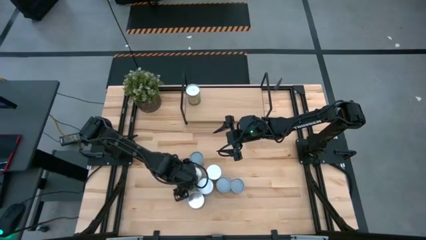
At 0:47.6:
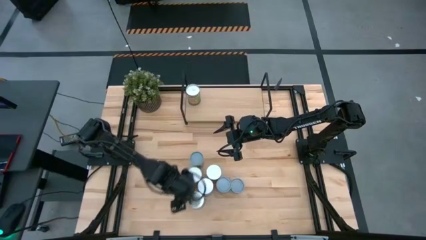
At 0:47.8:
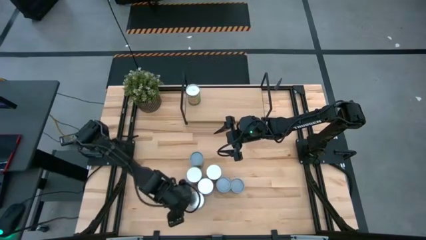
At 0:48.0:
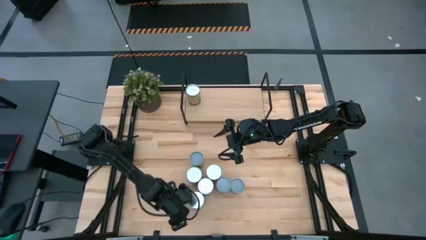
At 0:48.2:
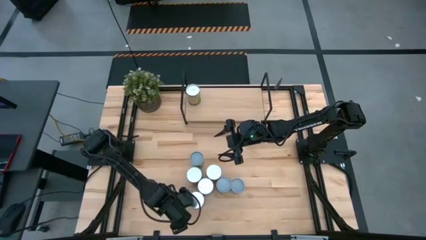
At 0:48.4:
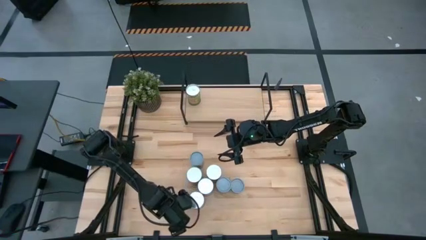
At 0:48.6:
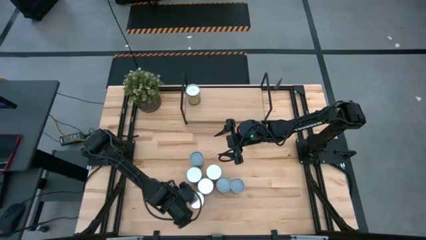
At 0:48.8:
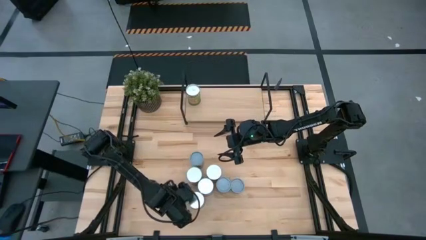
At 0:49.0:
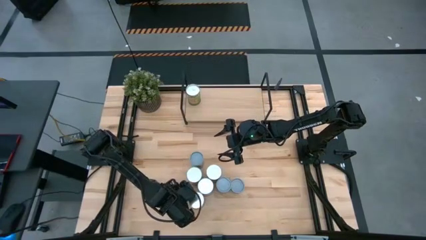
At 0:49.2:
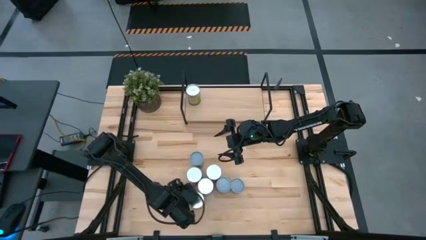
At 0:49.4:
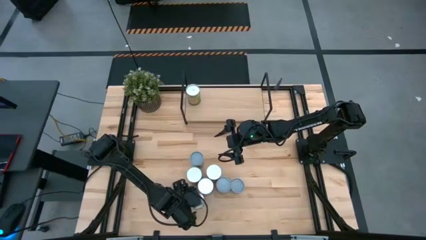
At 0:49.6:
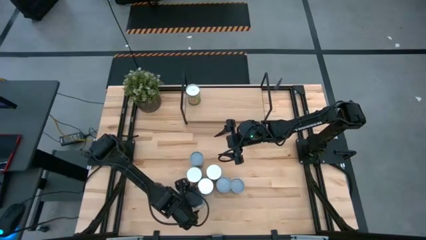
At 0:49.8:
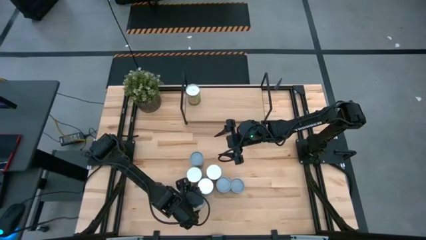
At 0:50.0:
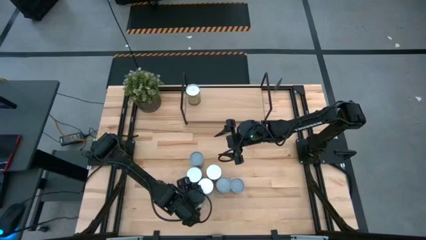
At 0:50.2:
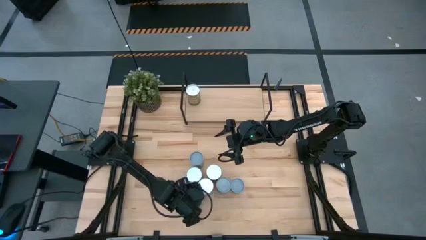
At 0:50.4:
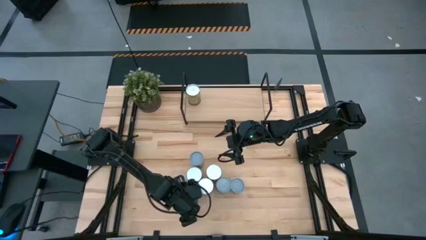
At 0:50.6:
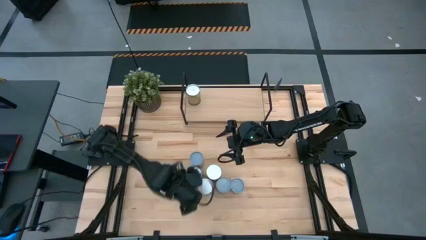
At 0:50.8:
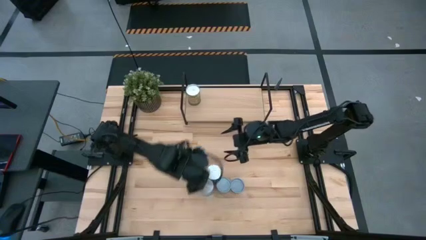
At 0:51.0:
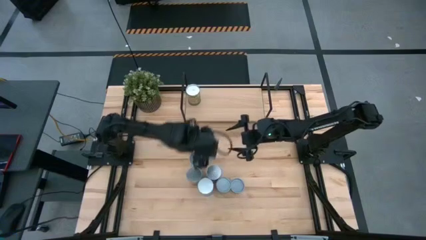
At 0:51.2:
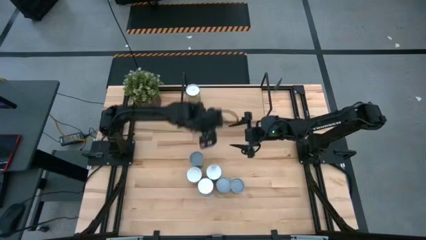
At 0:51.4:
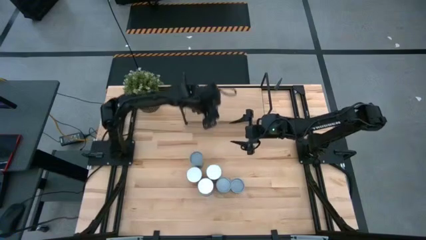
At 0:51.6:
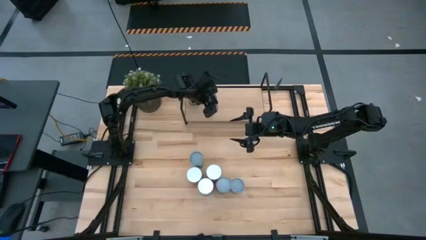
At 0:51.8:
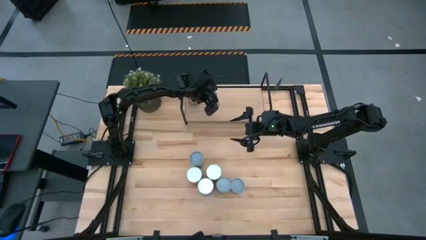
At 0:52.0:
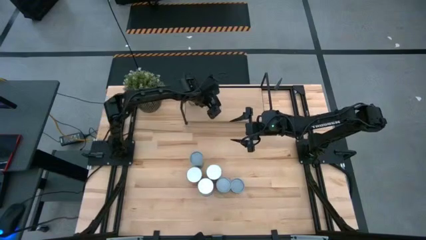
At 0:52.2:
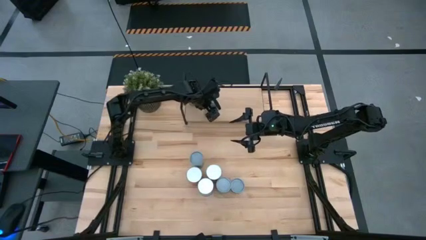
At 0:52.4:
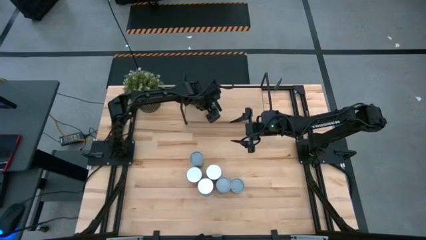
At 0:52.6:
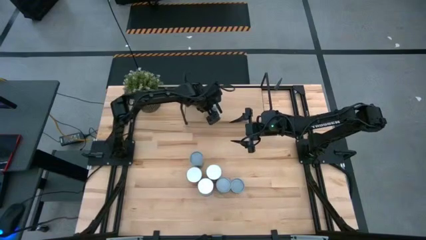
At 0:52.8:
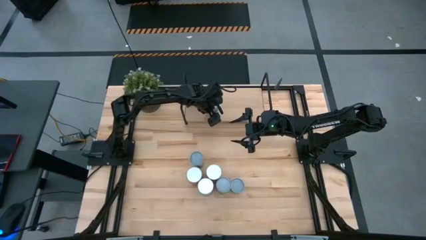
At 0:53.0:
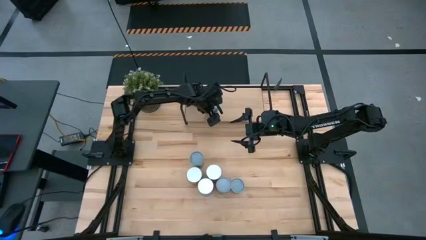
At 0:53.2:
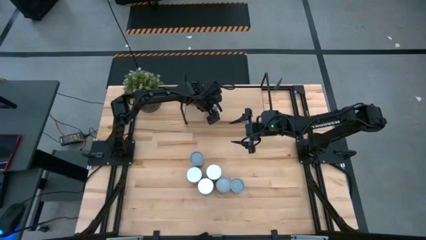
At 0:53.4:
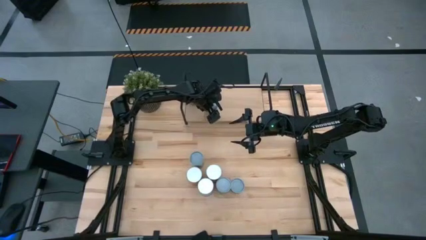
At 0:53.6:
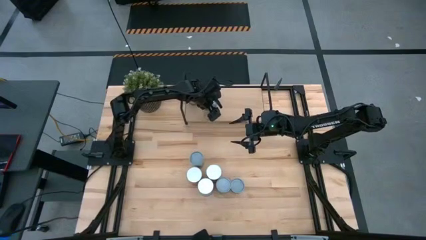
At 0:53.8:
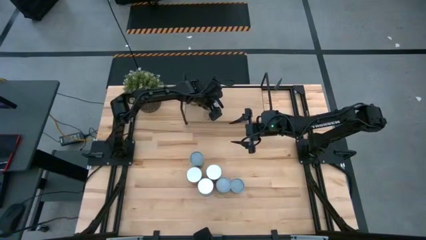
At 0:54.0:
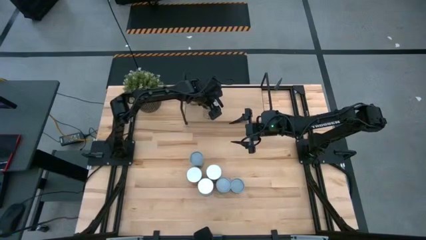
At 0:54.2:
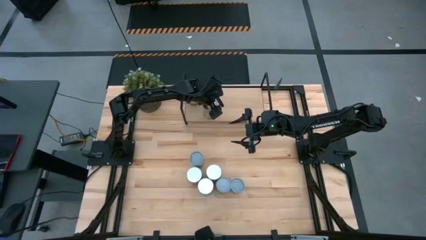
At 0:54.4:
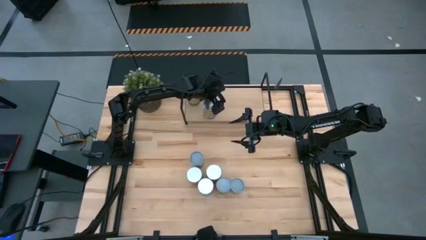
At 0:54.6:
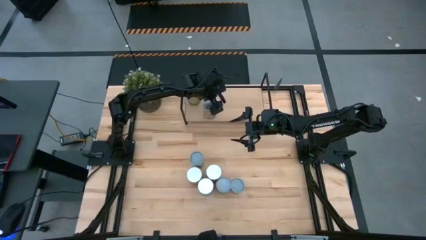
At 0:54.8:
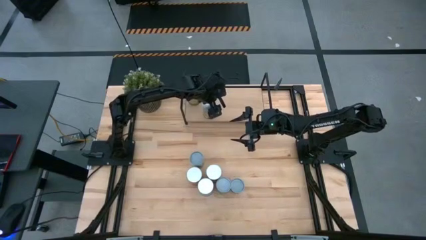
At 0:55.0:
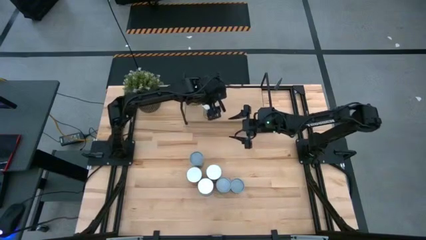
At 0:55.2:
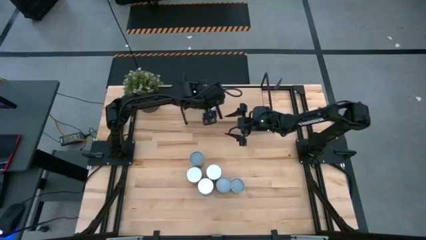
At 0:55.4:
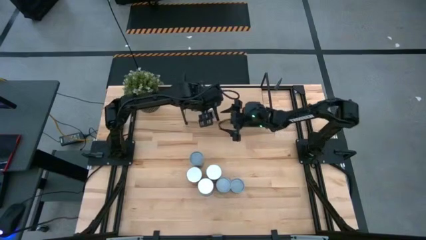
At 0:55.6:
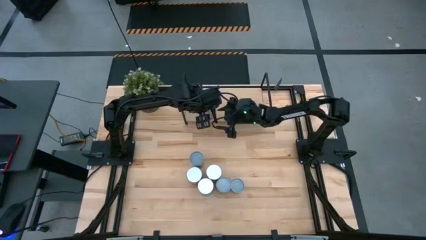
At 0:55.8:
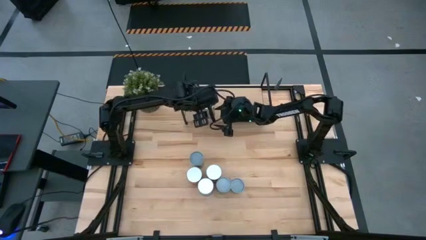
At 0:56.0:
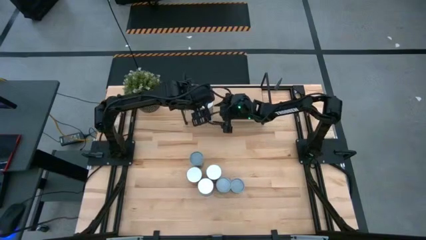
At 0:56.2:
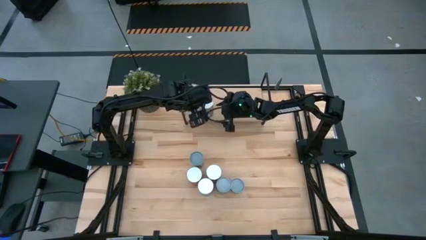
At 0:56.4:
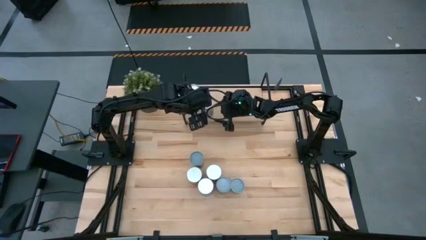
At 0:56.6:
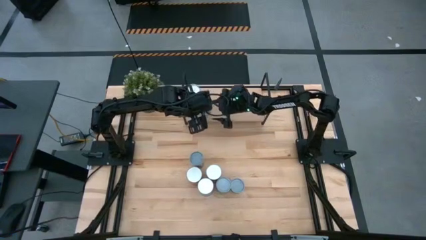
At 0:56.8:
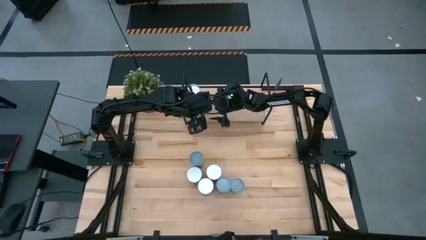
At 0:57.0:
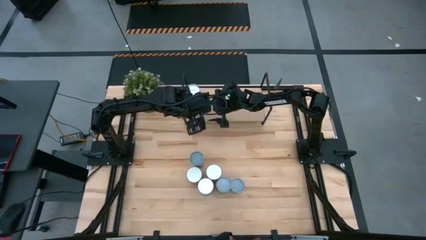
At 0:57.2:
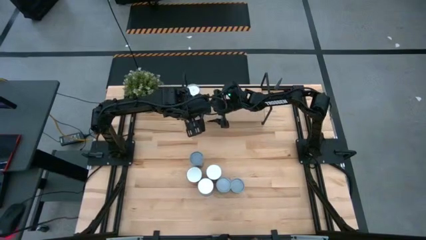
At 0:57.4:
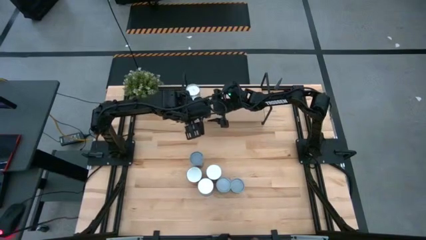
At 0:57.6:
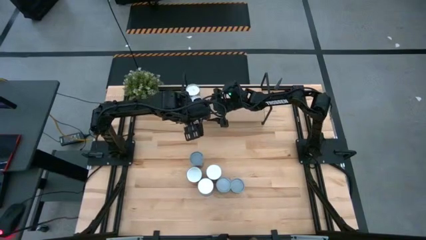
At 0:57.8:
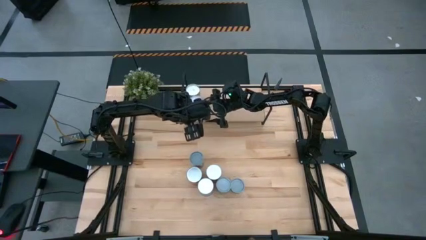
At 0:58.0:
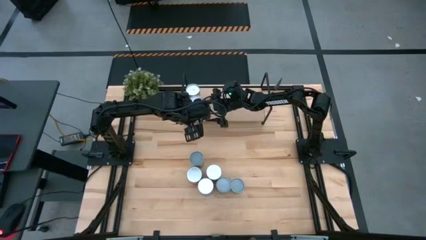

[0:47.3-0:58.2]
Task: Pick and place cans onto a shelf
Put the canned peaches on the shelf

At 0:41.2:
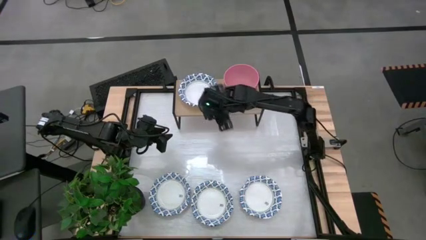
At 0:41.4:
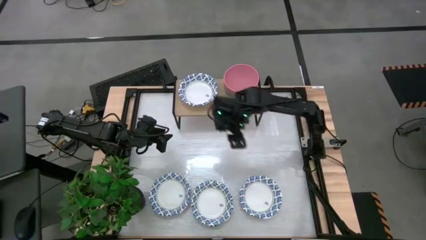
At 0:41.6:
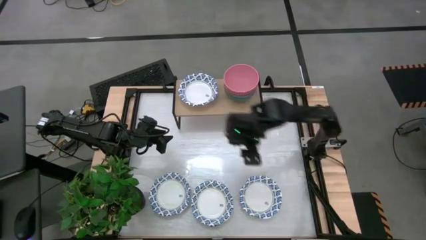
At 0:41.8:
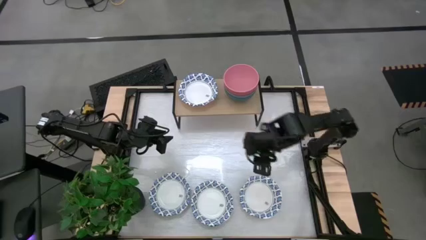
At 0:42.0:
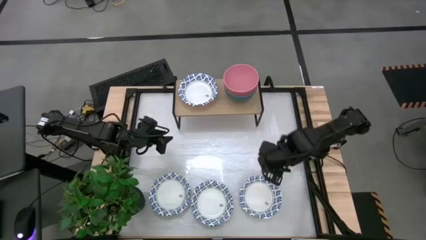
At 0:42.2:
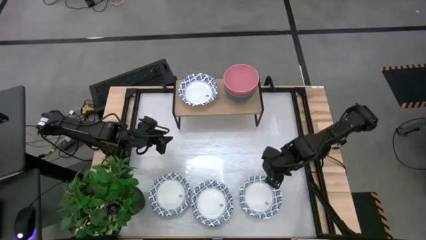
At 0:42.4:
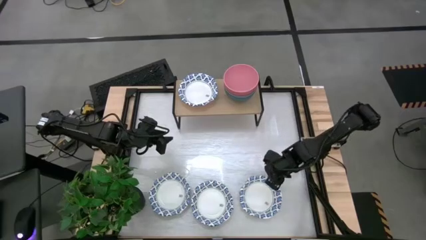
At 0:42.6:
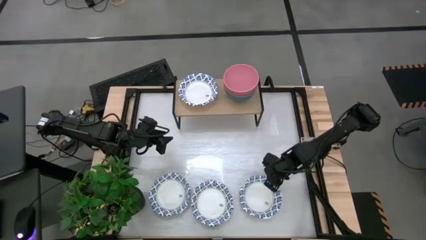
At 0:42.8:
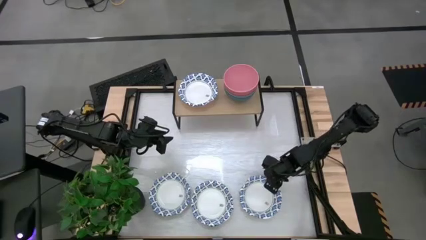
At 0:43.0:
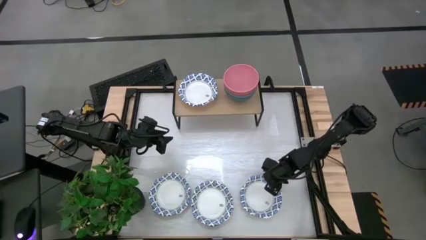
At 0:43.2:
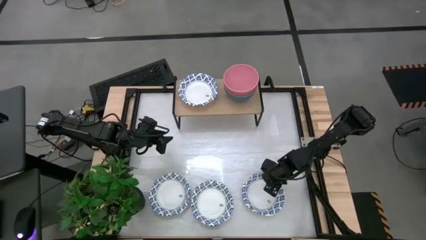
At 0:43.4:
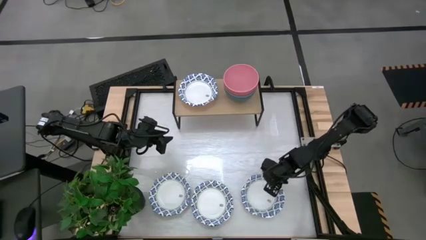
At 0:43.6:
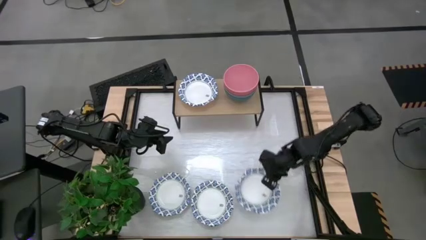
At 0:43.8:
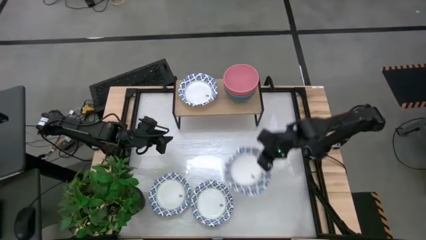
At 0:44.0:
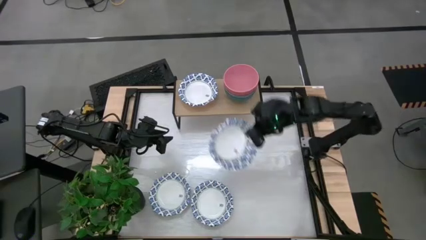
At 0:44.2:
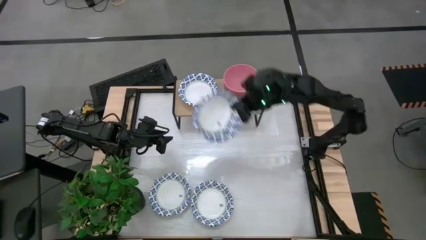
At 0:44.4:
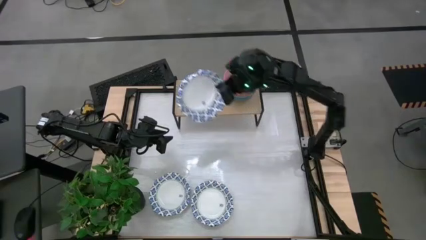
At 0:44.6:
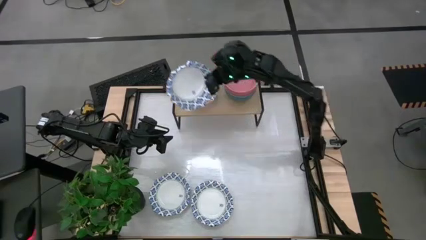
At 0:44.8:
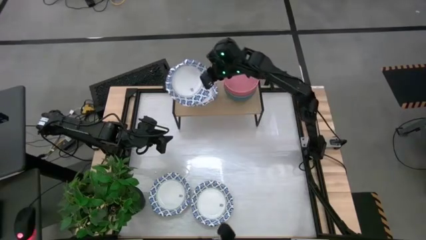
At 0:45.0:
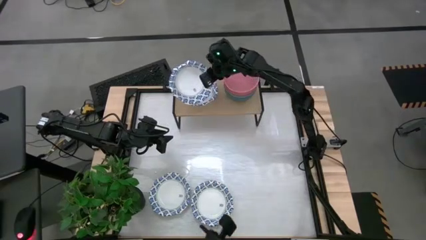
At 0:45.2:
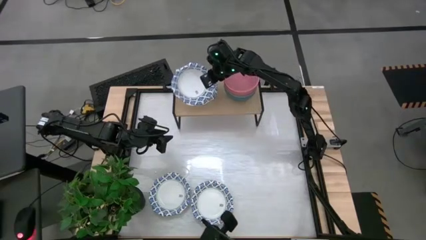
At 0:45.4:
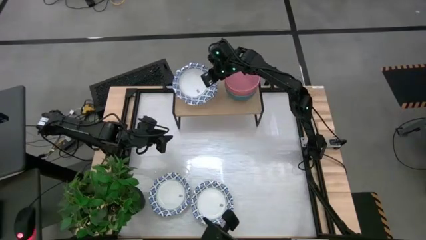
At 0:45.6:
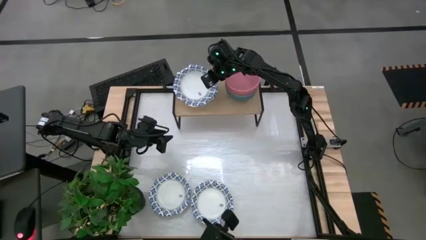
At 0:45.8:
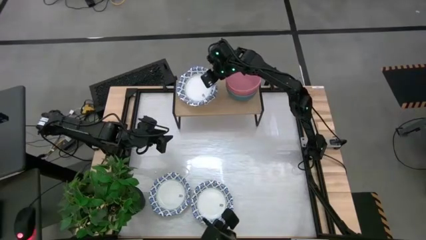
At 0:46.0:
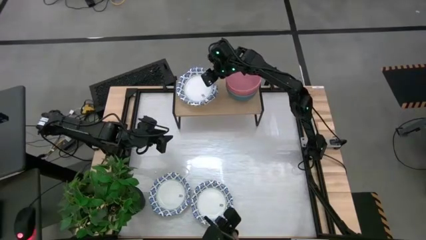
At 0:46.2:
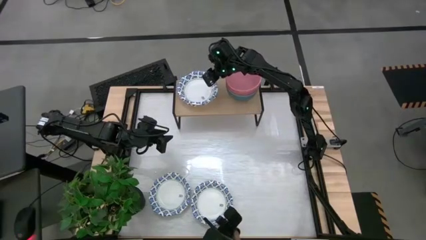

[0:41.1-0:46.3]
Task: Place and stack bowls onto a shelf
Stack the blue patterned bowl on top of the blue patterned bowl on the shelf
